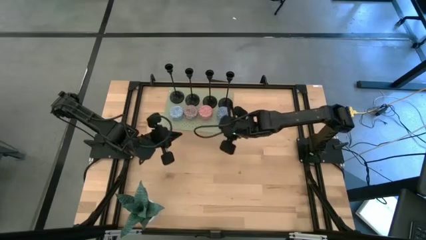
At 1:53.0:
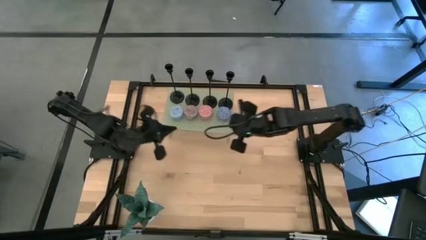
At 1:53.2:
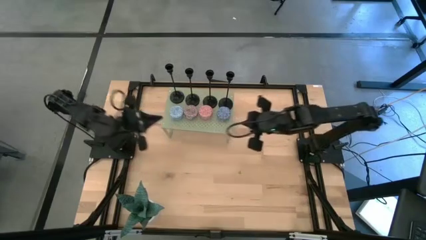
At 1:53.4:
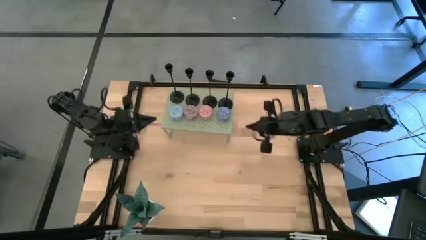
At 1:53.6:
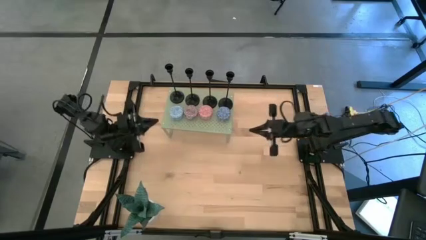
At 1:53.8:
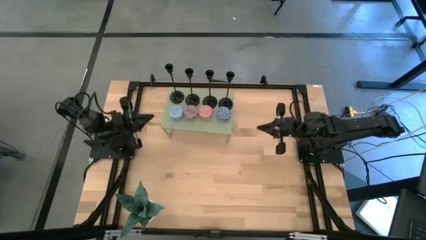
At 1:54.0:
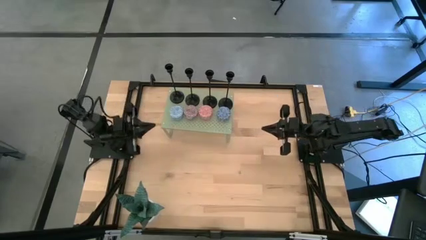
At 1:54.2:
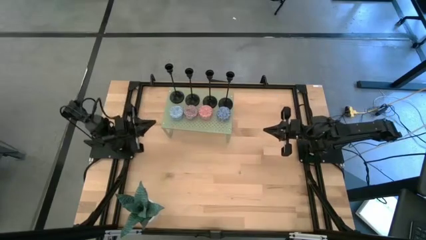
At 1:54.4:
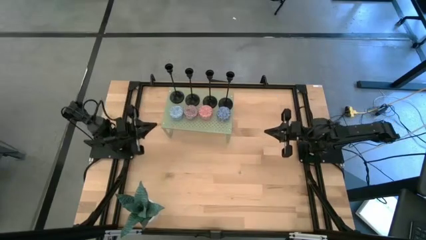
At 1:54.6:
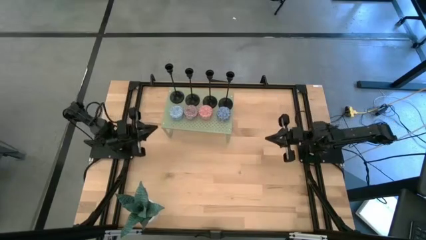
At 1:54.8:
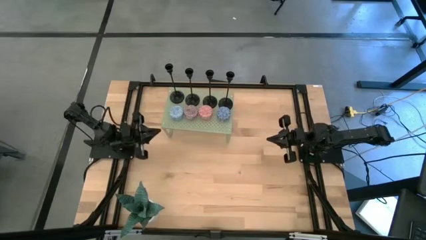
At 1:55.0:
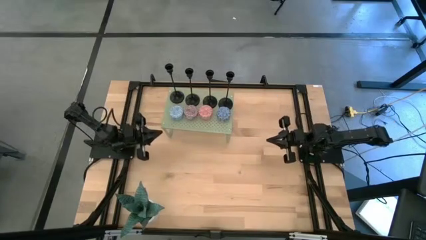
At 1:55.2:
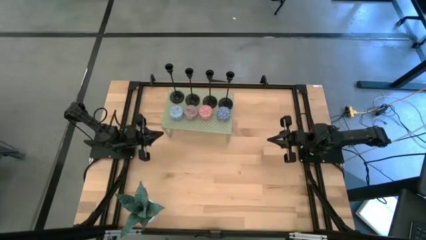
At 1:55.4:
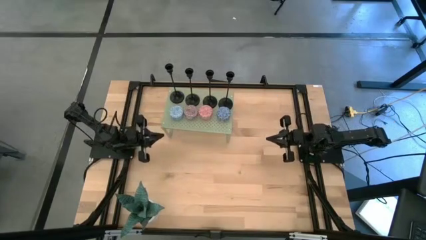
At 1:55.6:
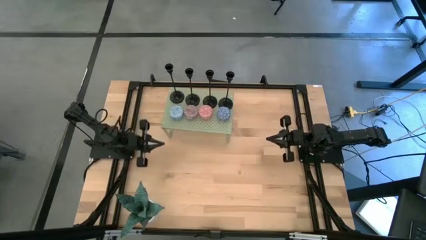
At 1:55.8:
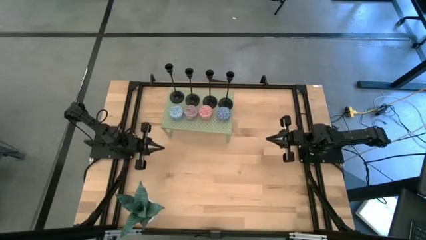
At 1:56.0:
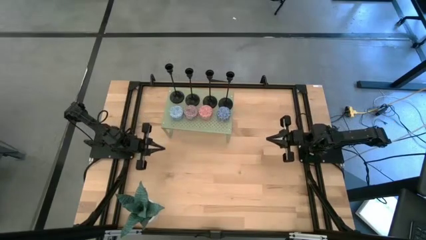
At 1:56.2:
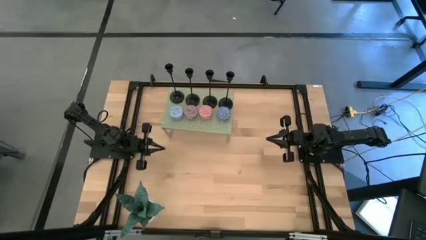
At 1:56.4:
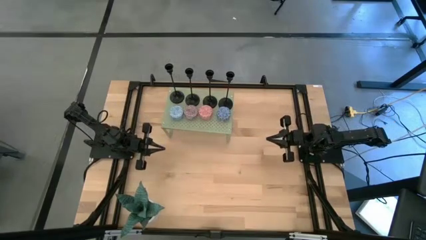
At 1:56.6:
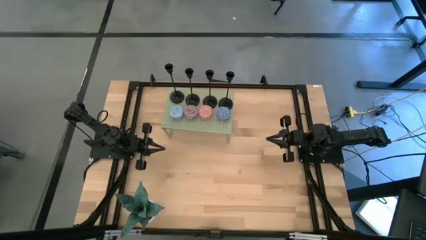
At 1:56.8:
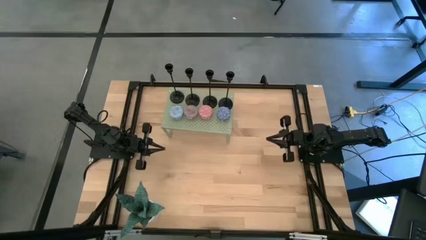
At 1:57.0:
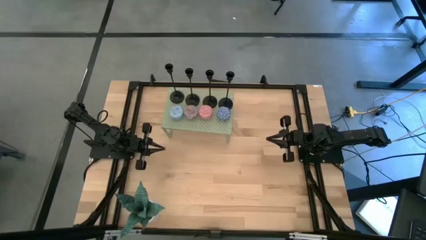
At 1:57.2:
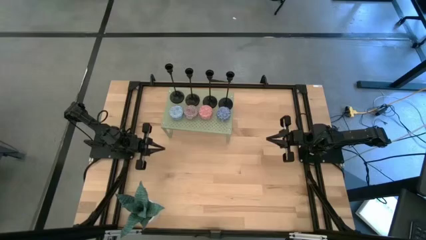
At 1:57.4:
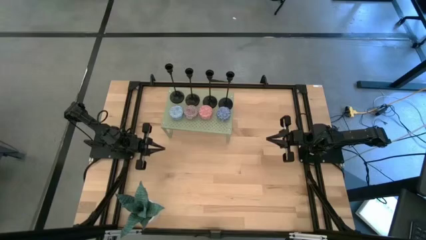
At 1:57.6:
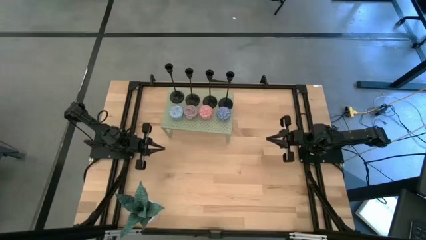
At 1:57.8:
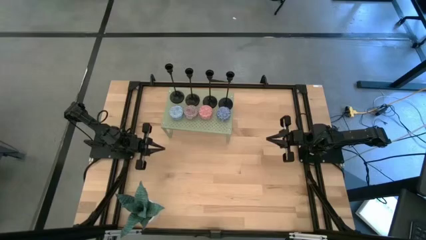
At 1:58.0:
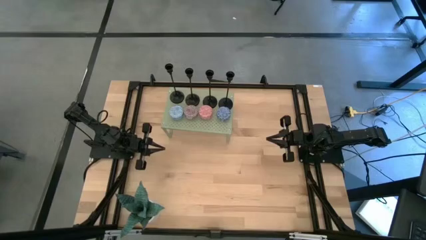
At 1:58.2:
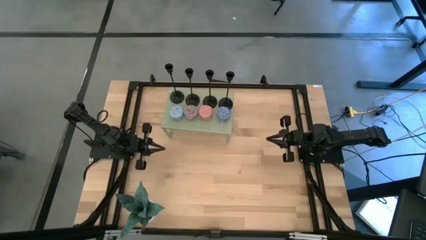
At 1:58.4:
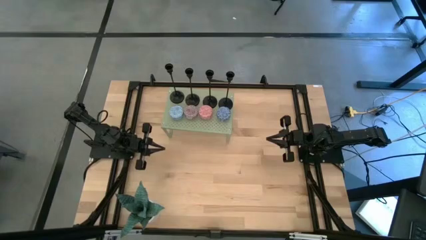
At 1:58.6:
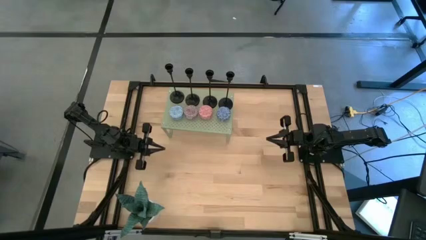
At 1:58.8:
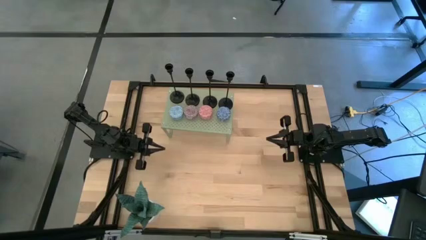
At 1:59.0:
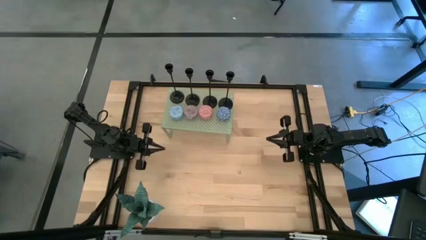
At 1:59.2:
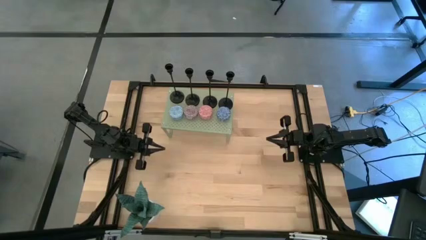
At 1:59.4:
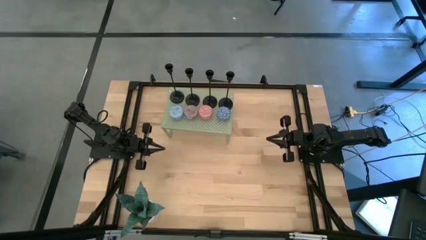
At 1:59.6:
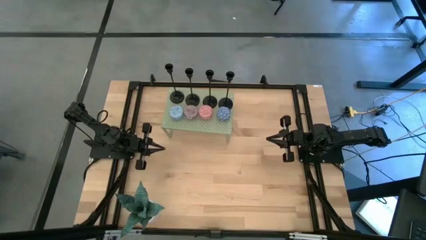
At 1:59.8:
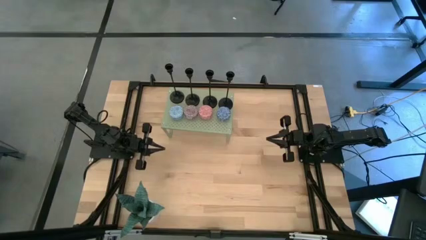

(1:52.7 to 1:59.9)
Task: Pick & Place candle stick holders
Return to Home Position

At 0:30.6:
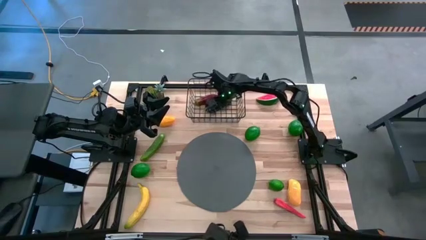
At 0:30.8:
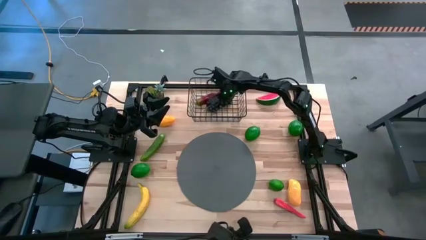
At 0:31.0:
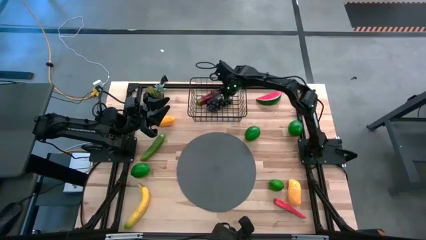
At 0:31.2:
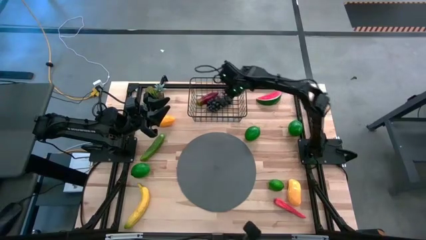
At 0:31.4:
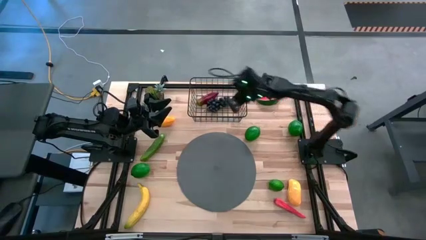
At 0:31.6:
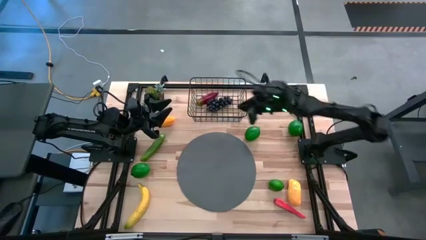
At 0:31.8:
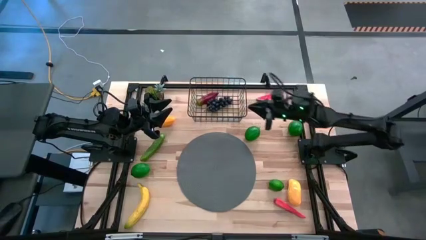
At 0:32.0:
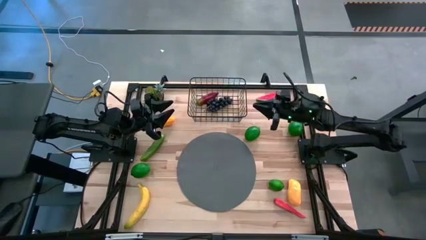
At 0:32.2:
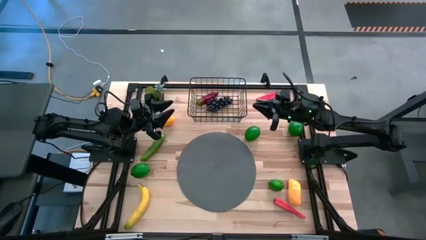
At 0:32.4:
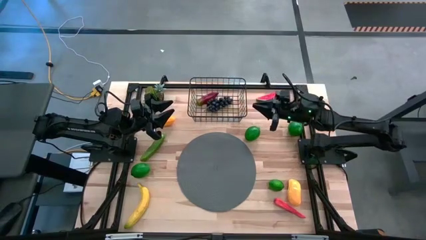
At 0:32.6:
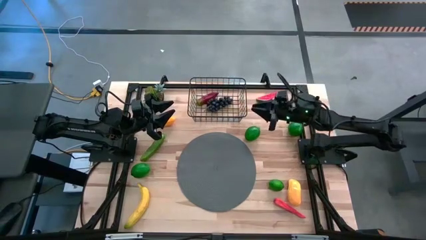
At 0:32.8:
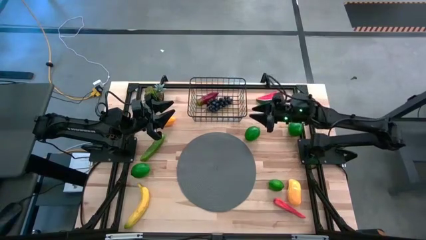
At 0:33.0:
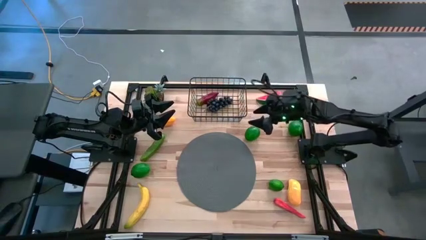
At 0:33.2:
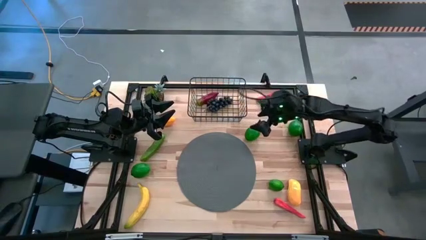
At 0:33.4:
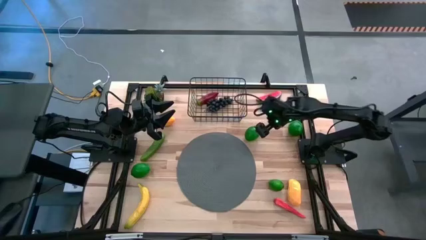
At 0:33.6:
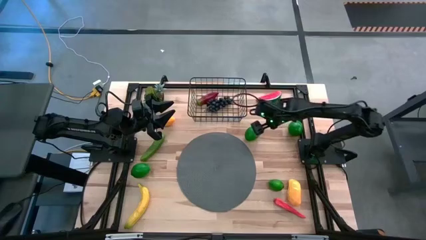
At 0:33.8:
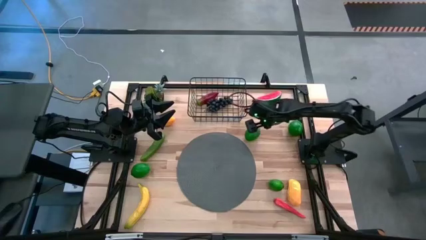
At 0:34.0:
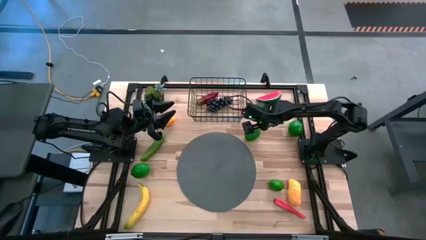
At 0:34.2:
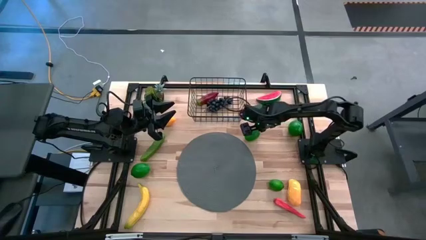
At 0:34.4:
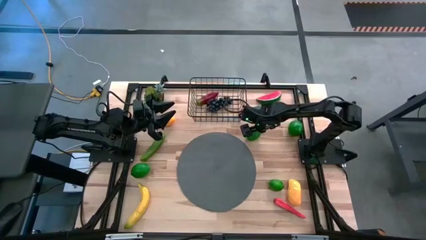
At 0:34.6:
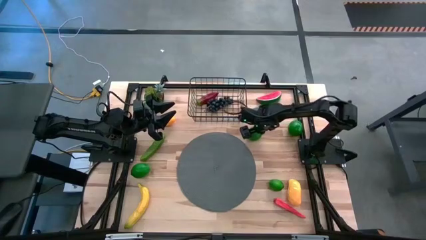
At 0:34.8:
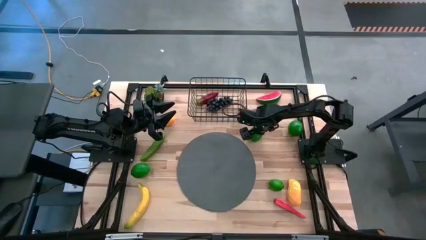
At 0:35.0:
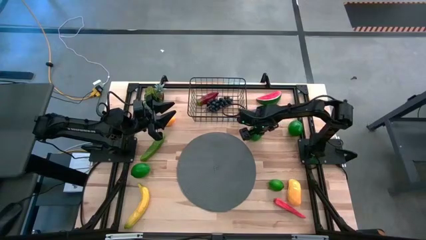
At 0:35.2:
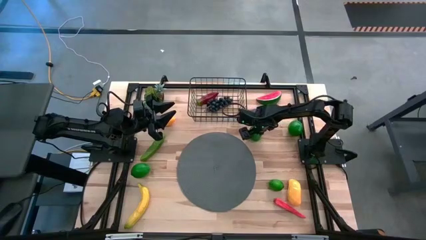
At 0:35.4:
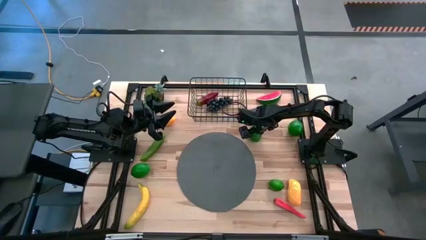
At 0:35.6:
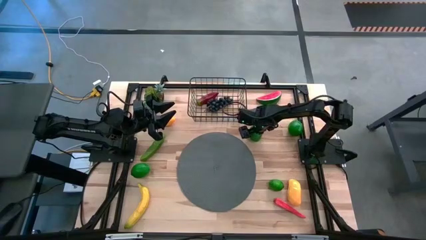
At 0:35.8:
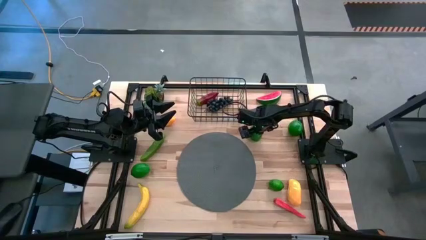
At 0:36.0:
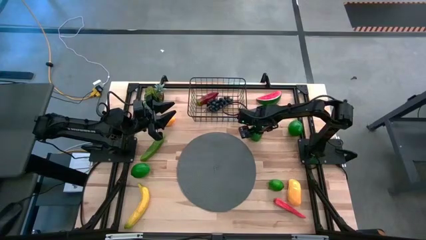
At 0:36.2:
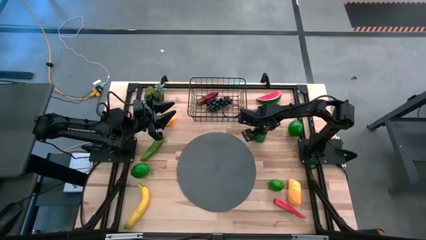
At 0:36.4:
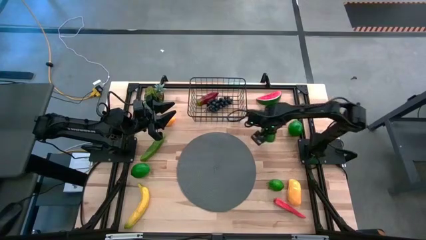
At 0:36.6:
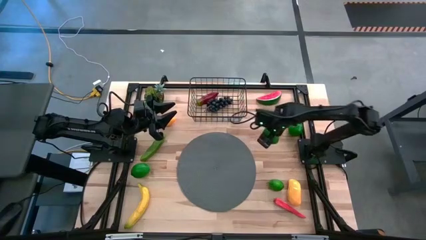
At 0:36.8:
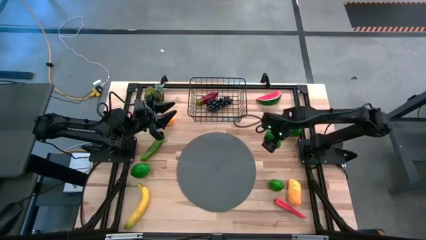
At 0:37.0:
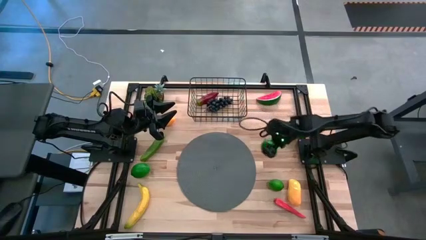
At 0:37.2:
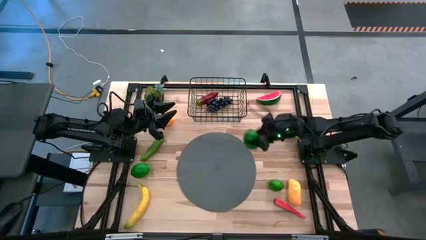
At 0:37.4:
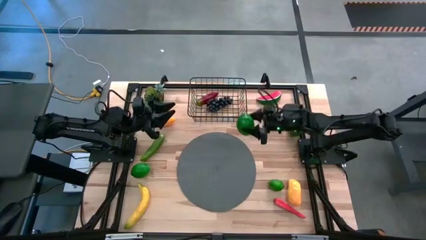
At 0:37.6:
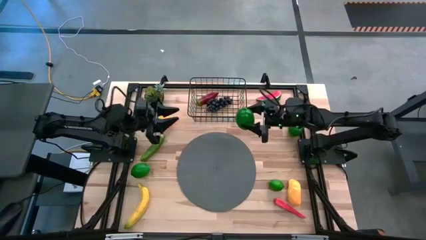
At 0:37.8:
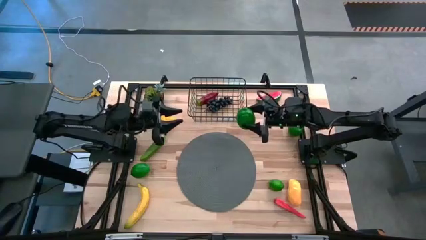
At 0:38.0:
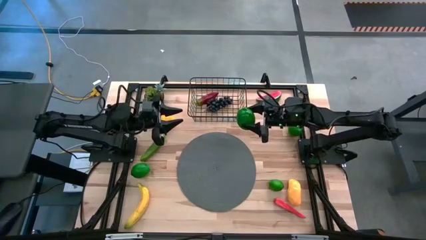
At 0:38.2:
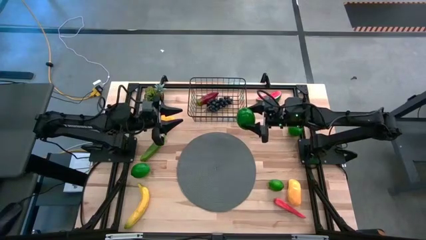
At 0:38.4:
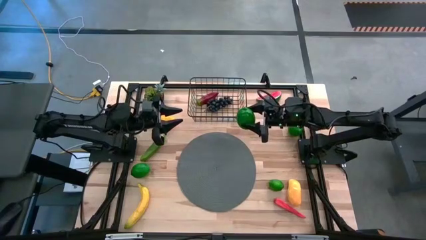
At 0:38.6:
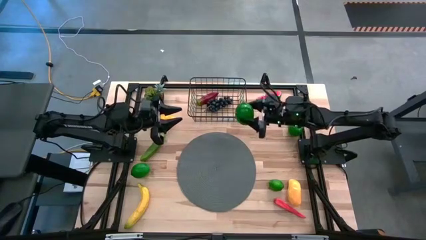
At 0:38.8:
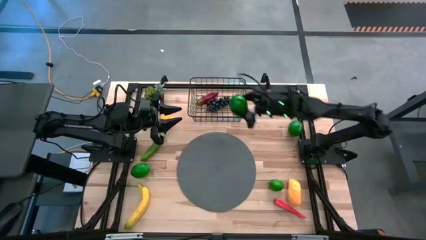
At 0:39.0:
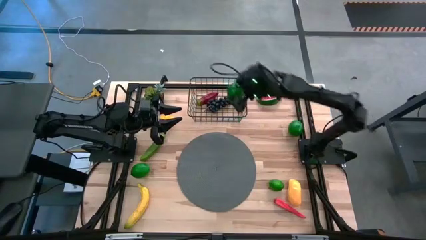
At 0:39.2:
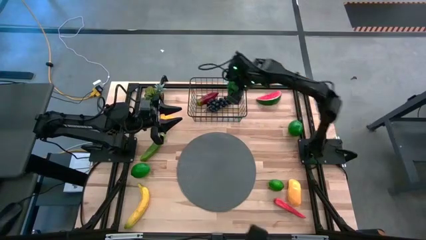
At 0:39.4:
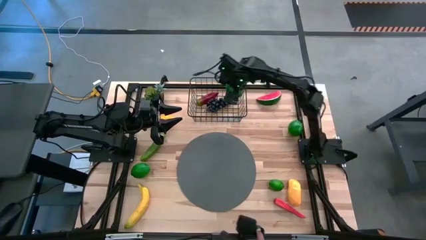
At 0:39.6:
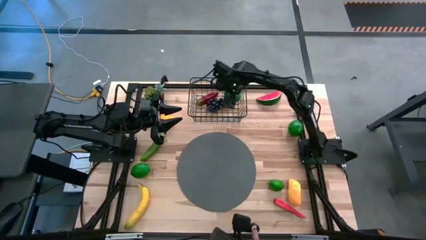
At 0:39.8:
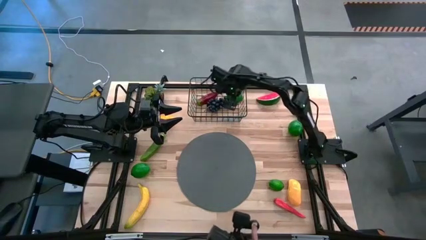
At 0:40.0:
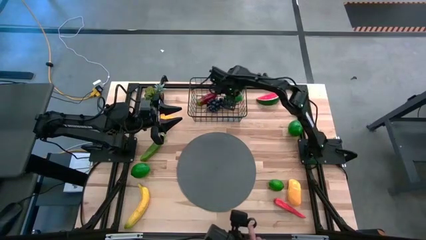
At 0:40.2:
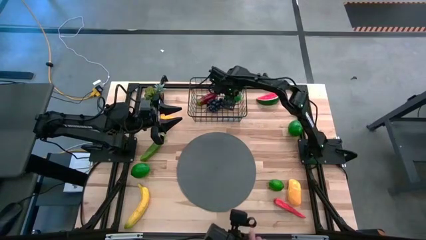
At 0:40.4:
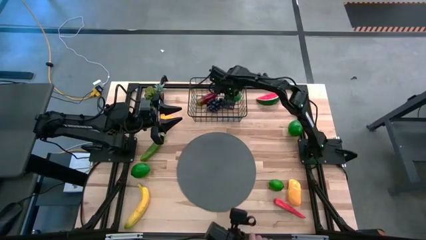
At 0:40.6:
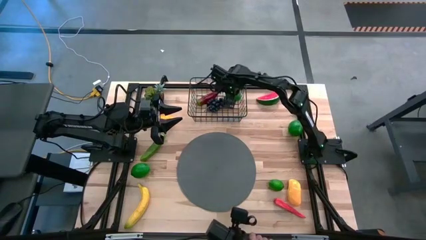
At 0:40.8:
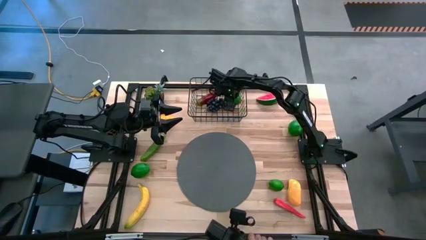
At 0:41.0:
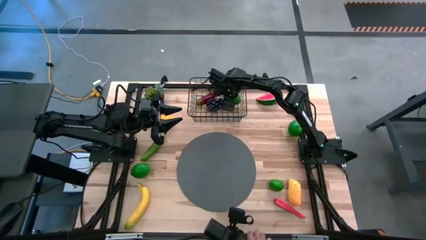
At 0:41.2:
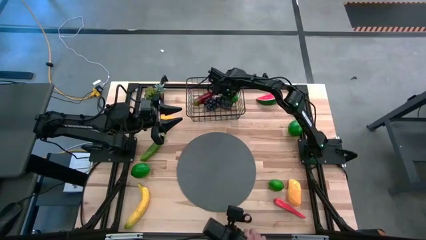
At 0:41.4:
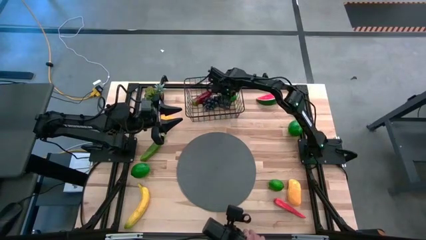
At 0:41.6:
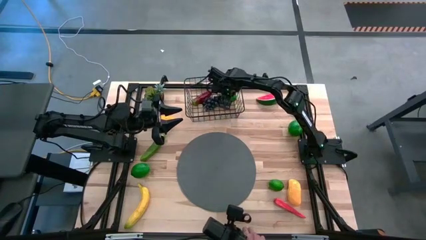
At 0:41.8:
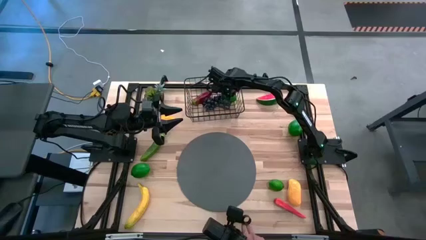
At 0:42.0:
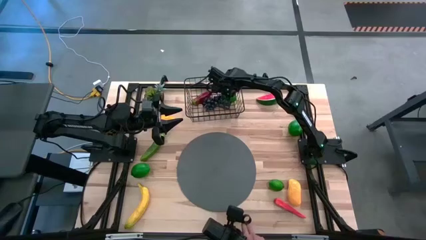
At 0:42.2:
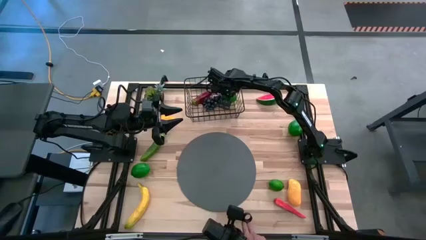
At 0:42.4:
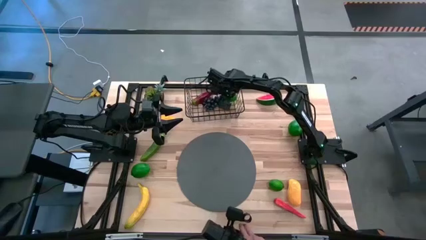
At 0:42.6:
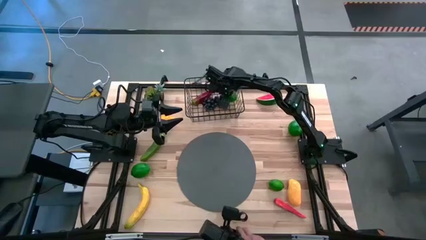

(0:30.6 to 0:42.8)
Task: Build produce basket
Put the green lime into the black wire basket
